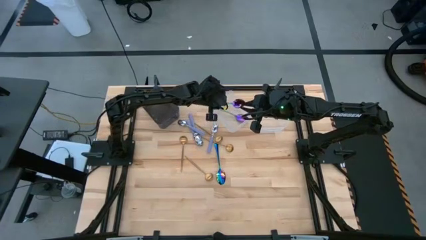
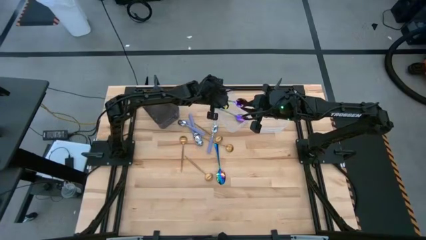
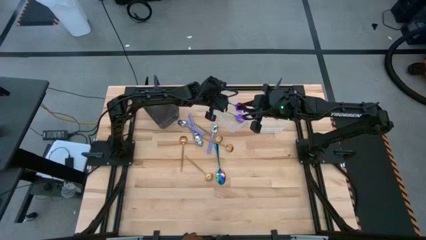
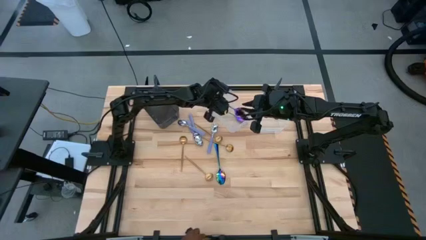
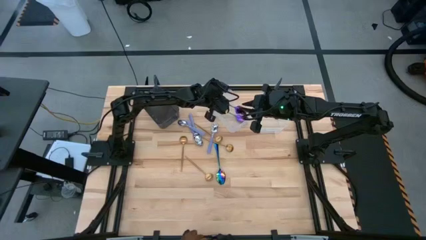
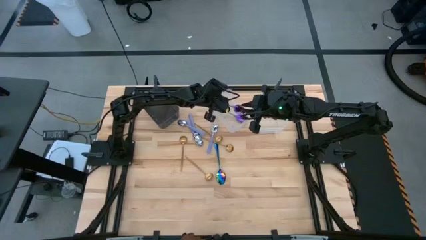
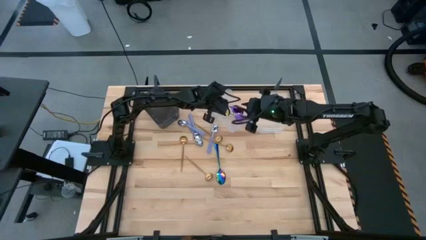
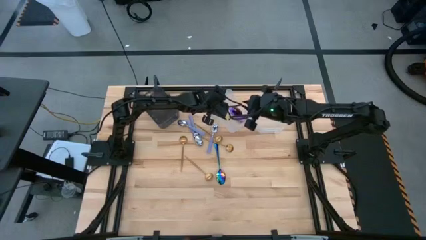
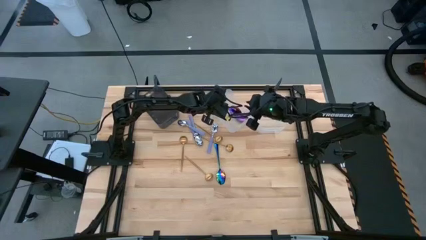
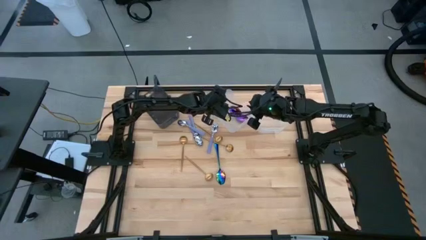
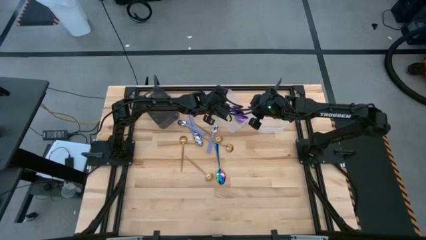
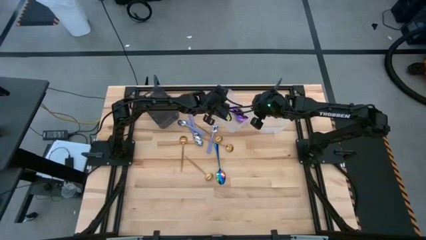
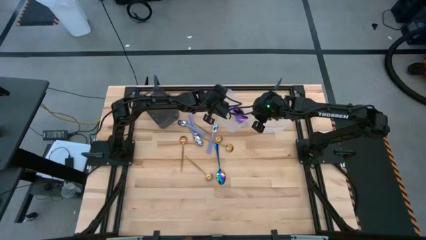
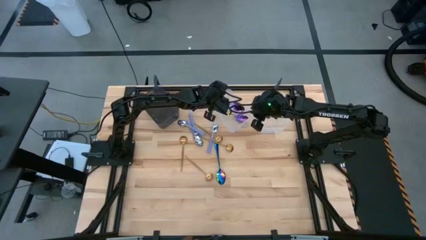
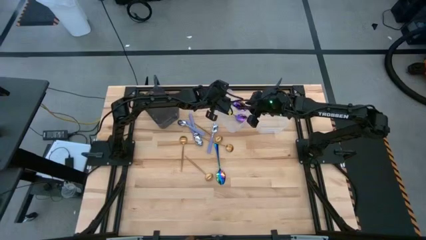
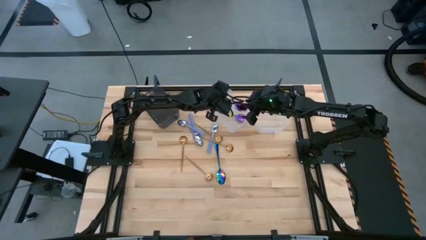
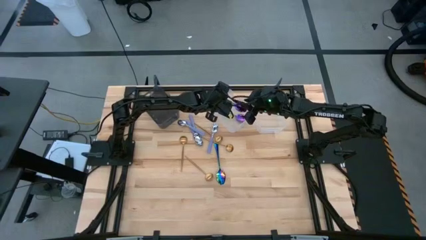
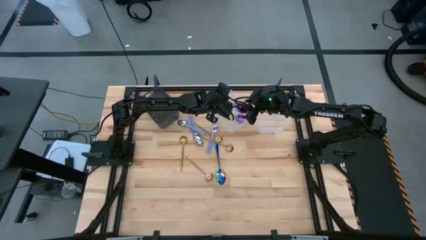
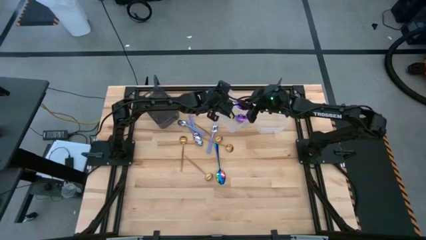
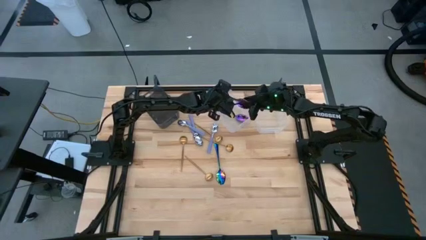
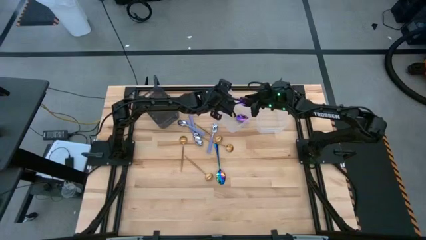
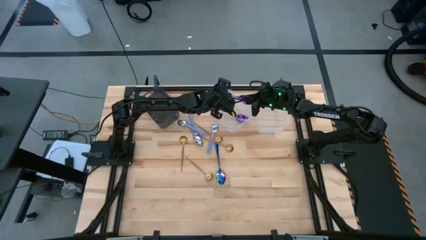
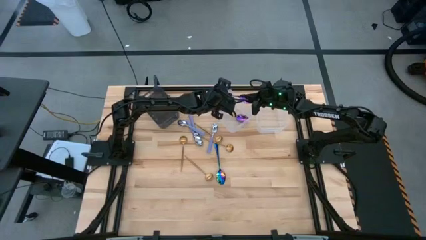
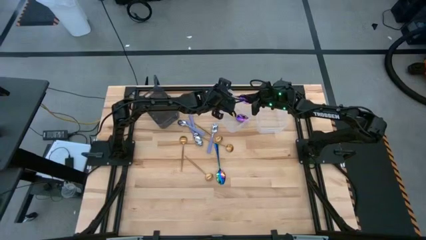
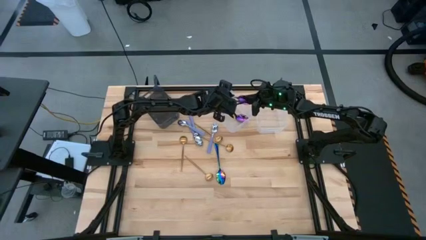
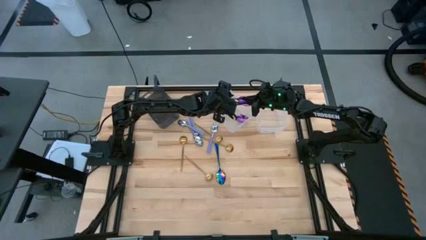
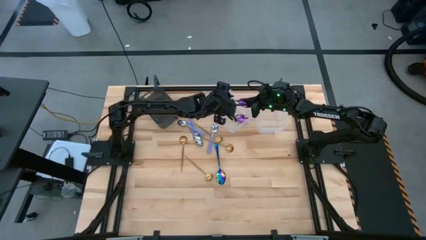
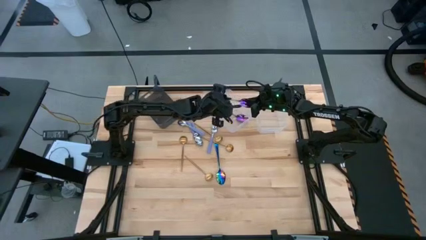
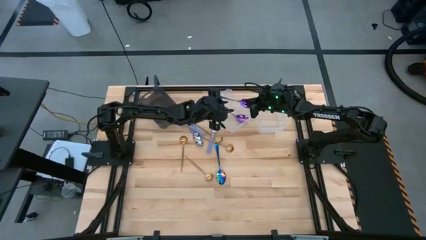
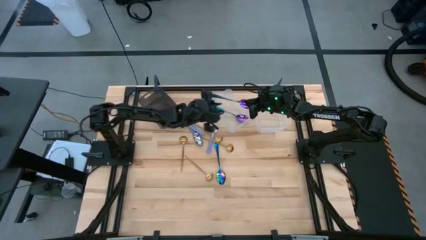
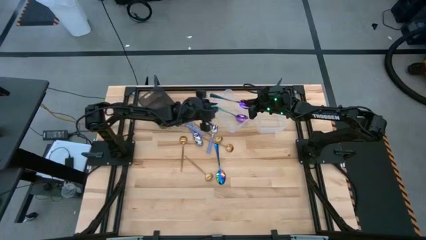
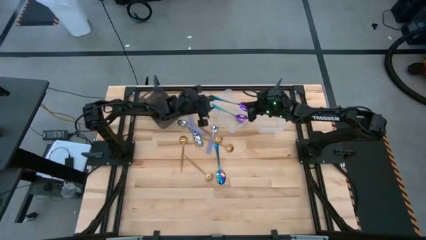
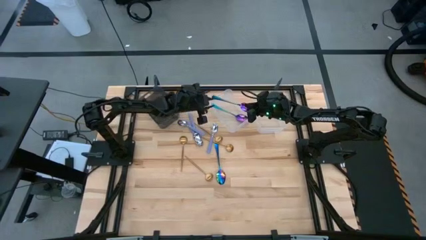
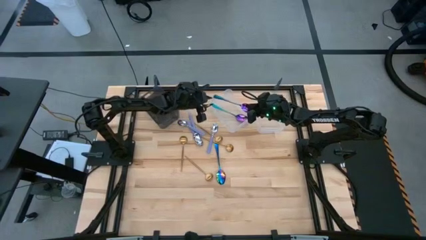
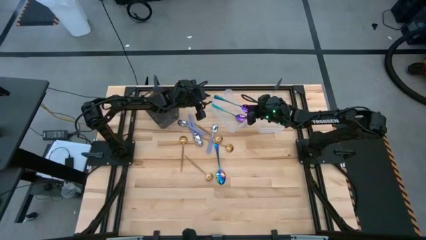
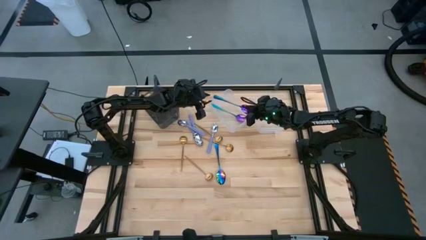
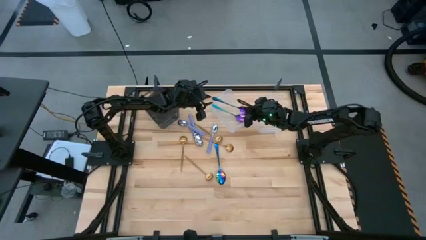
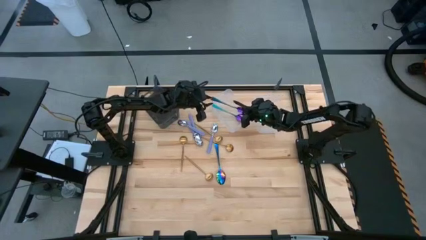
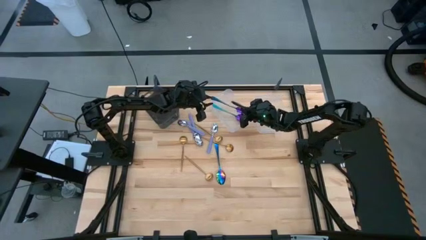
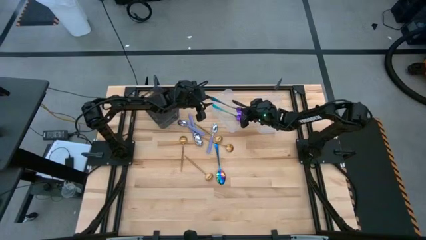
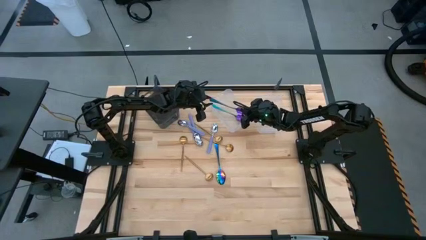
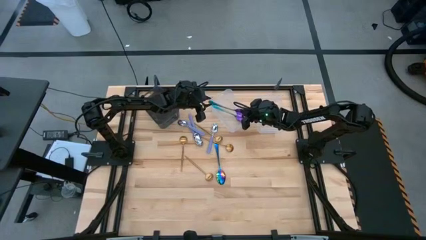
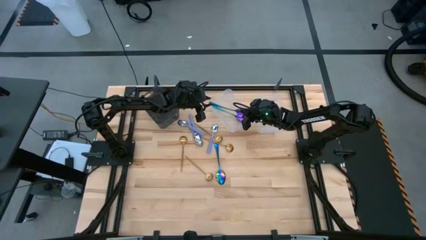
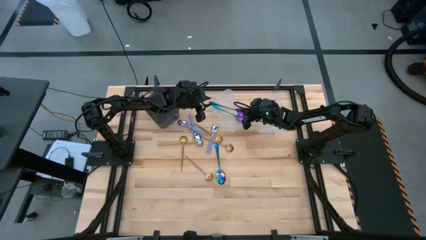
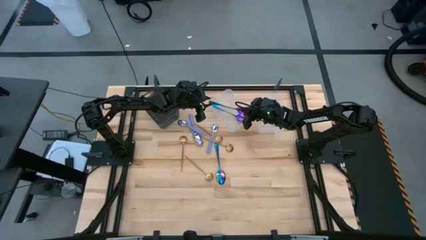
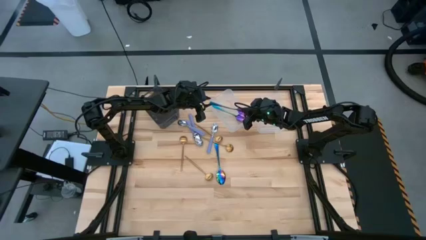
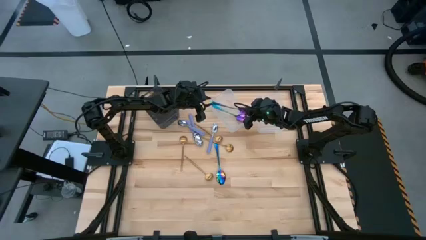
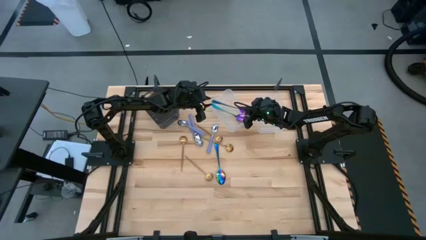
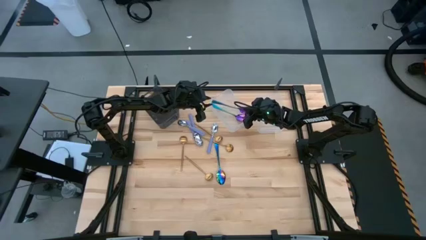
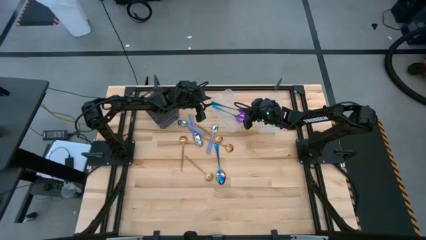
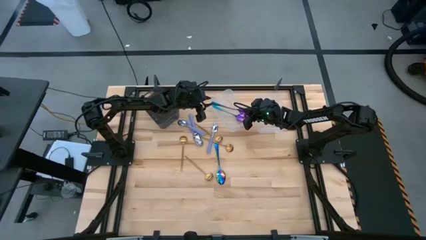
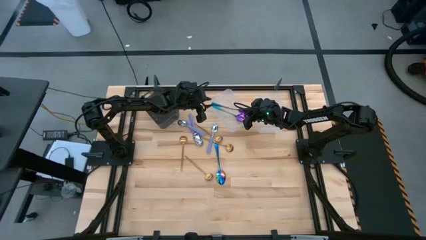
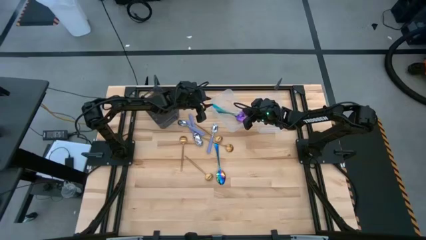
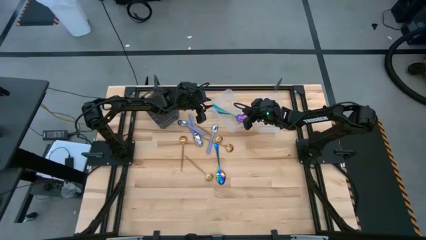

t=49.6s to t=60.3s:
Task: Sort silverware by color (type)
Put the blue spoon into the left transparent bin

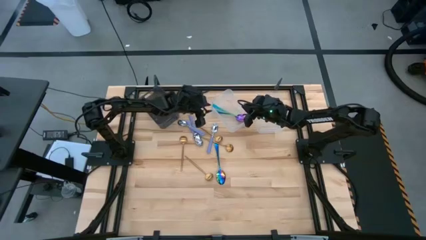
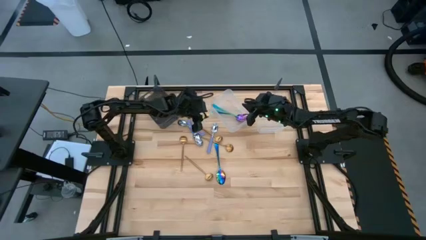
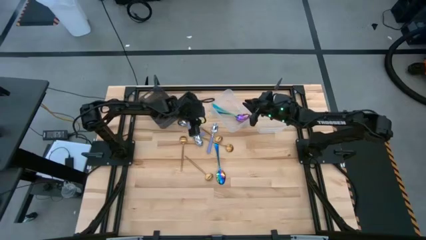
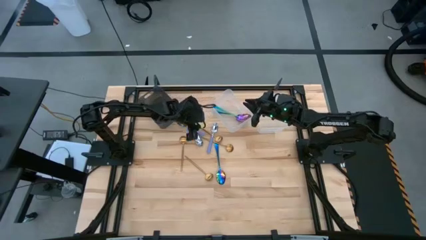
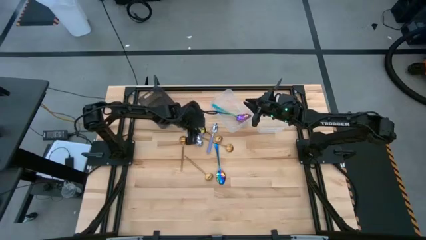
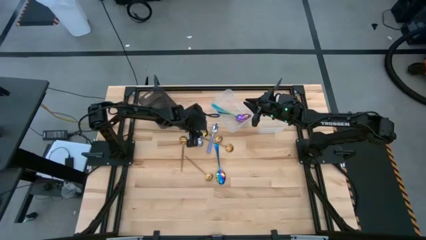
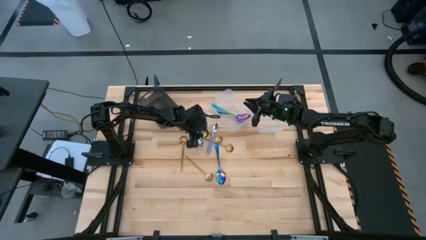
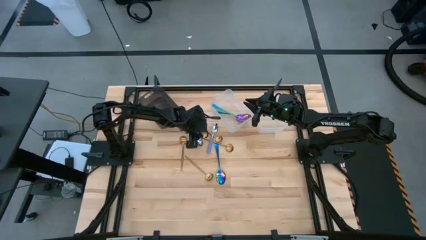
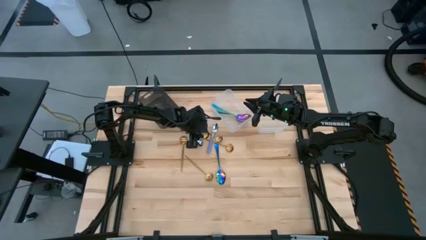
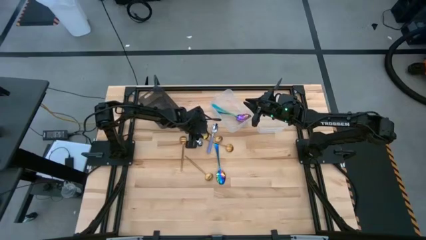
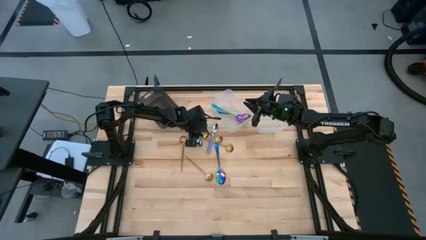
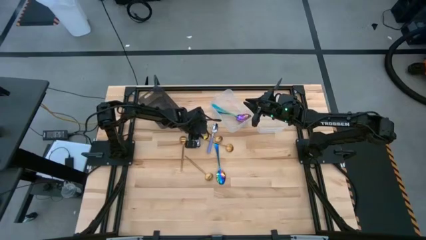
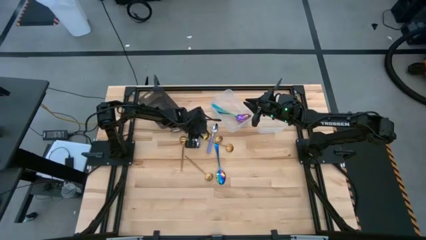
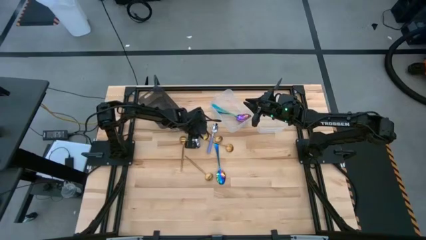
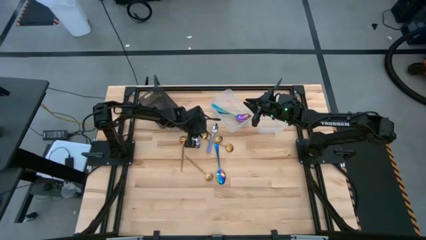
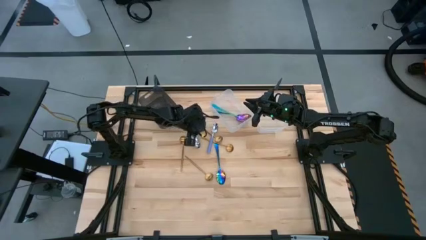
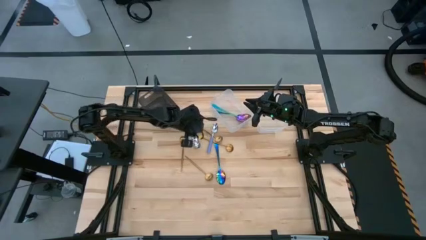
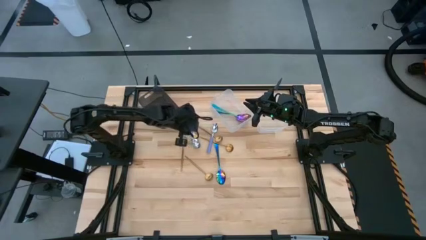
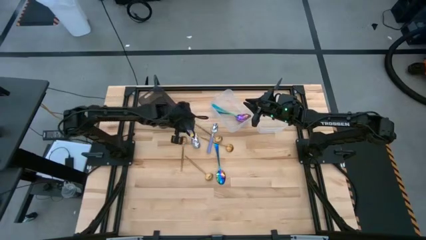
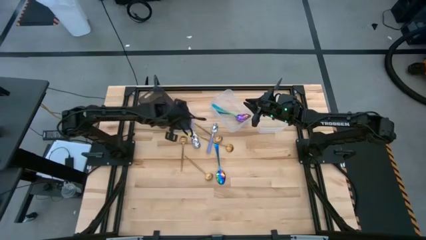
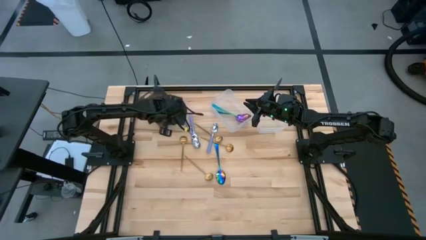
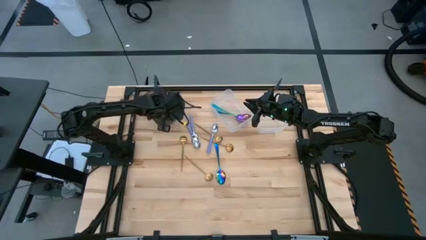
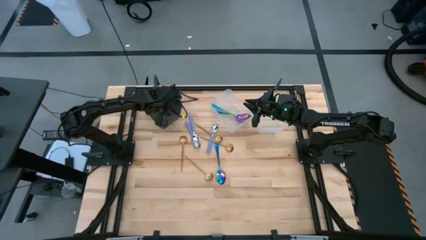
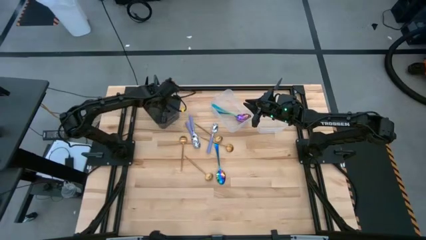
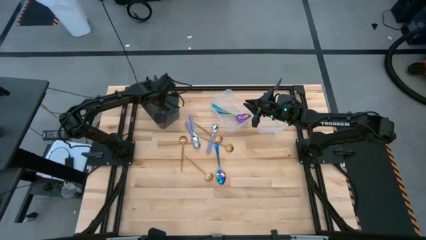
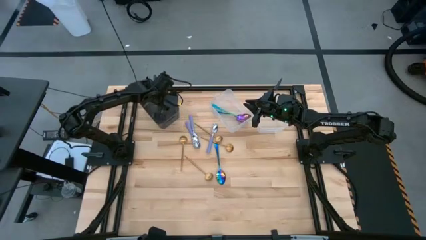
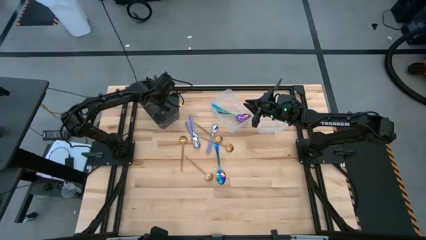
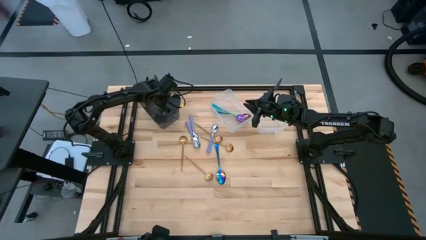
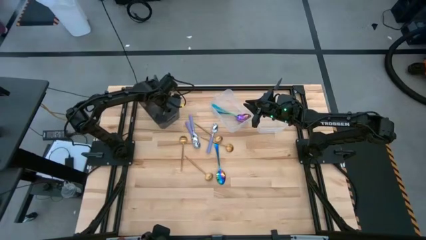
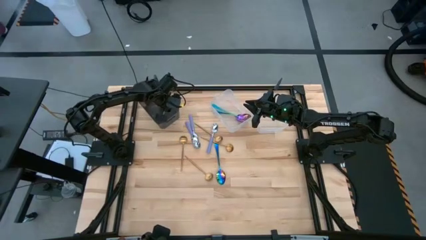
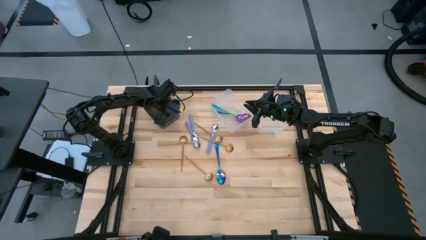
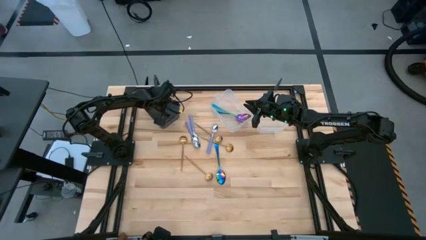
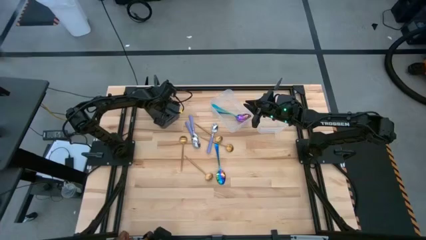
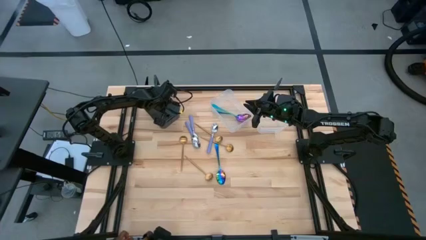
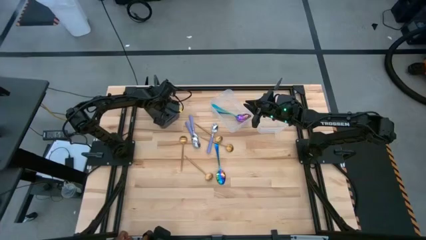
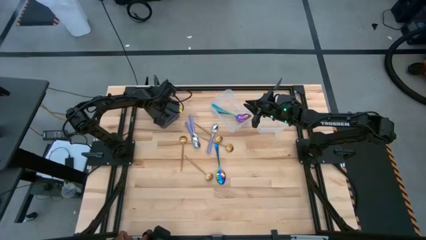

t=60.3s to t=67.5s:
Put the purple spoon into the black bin
